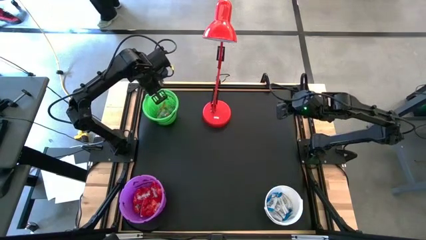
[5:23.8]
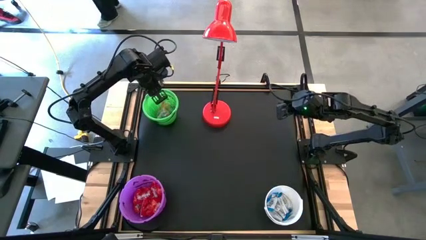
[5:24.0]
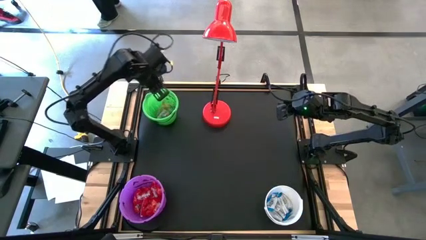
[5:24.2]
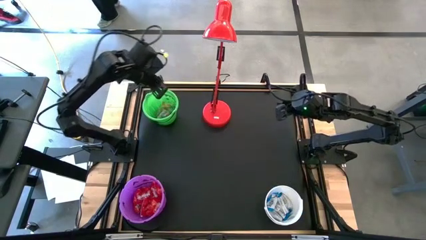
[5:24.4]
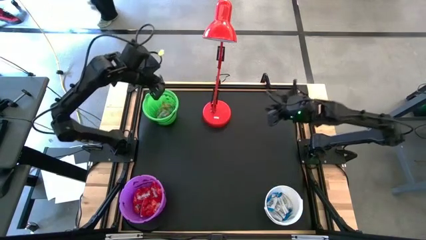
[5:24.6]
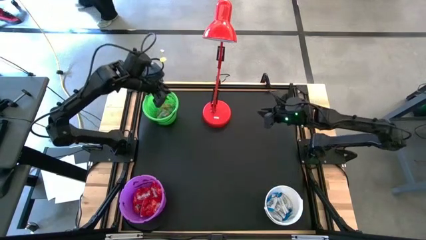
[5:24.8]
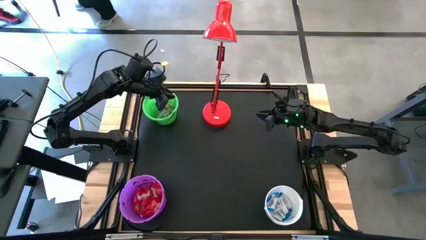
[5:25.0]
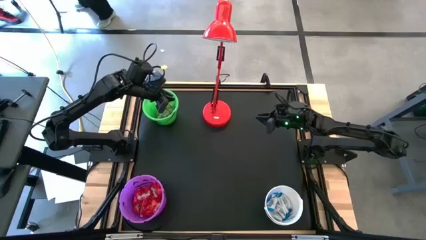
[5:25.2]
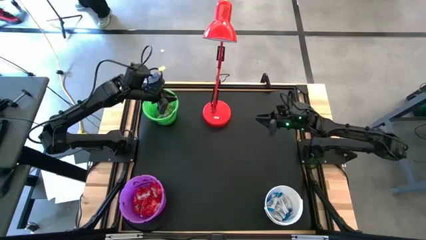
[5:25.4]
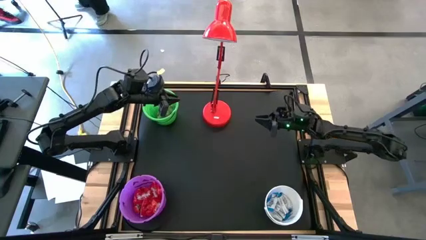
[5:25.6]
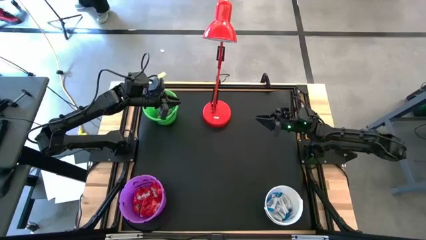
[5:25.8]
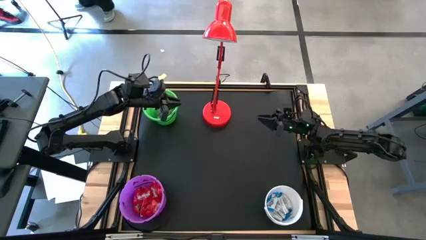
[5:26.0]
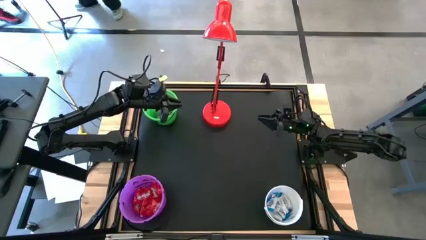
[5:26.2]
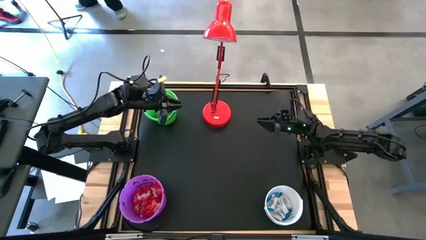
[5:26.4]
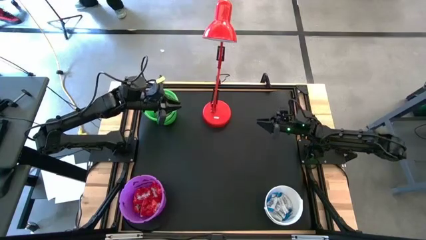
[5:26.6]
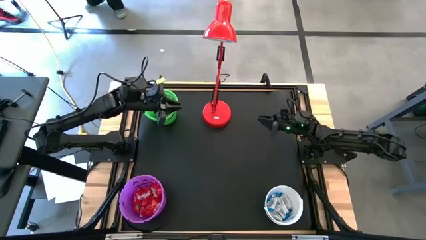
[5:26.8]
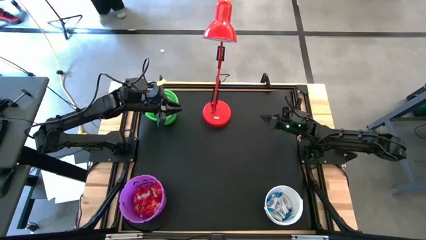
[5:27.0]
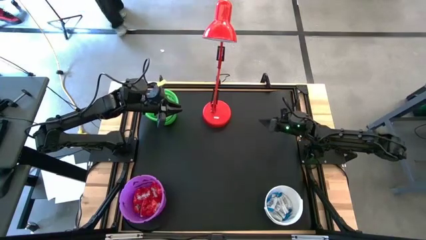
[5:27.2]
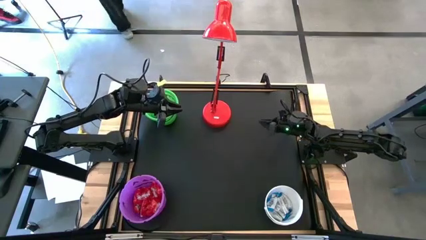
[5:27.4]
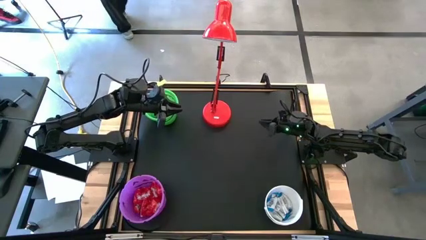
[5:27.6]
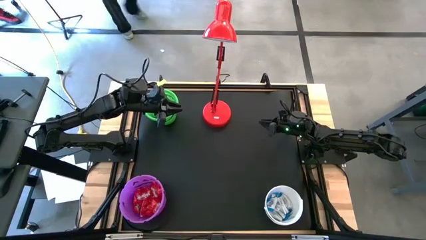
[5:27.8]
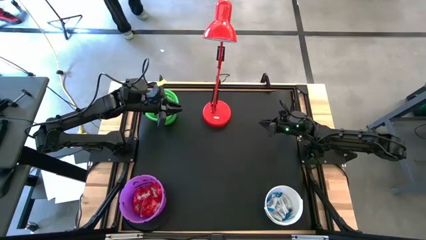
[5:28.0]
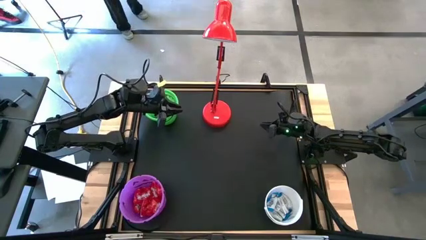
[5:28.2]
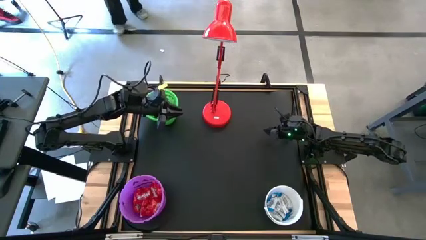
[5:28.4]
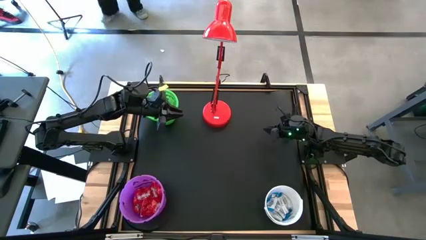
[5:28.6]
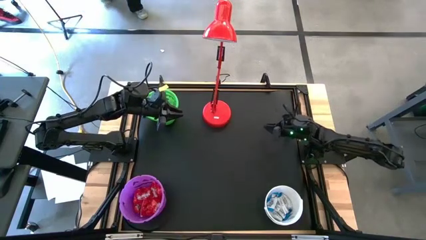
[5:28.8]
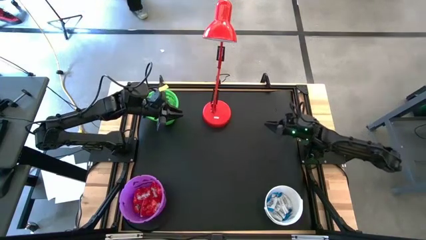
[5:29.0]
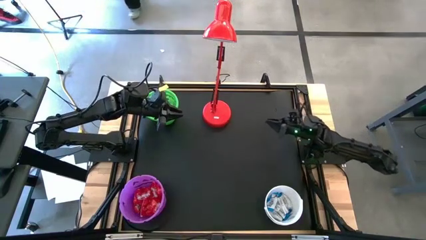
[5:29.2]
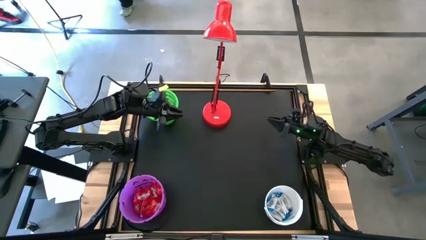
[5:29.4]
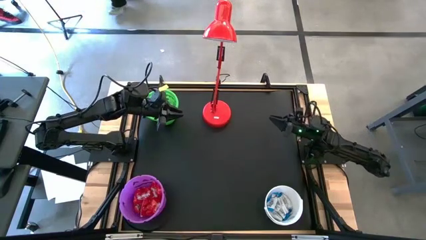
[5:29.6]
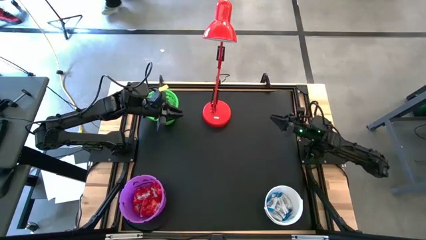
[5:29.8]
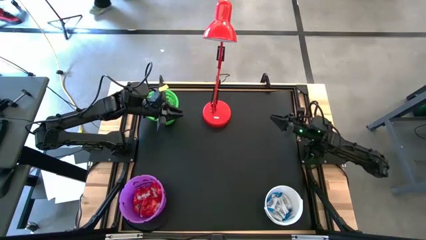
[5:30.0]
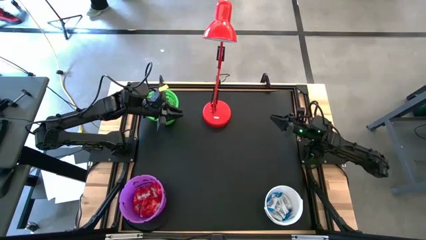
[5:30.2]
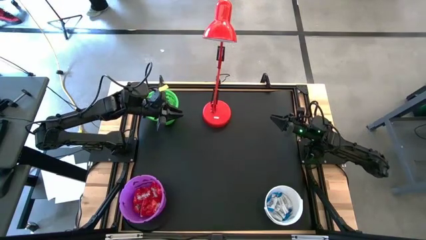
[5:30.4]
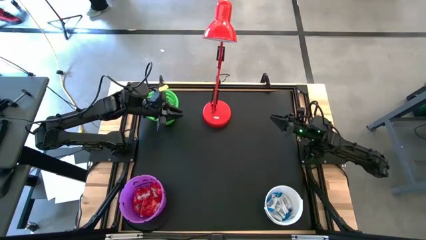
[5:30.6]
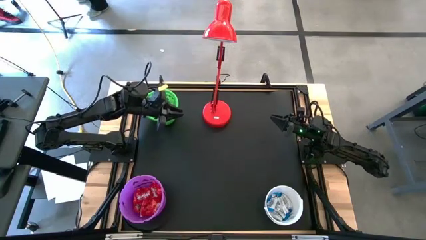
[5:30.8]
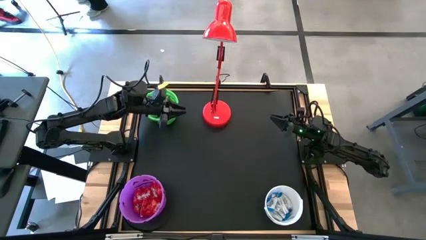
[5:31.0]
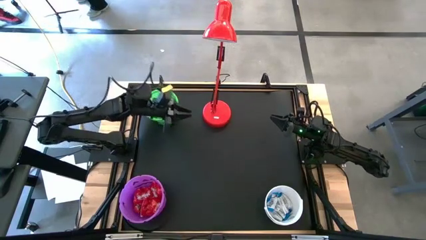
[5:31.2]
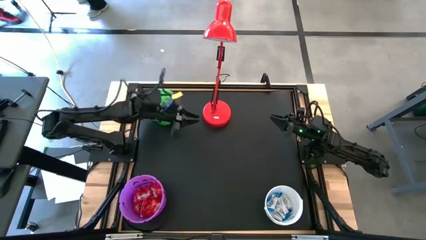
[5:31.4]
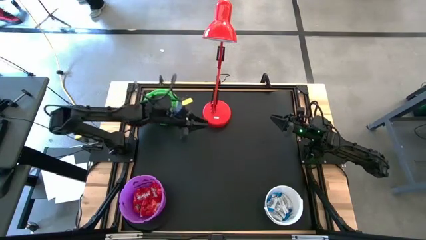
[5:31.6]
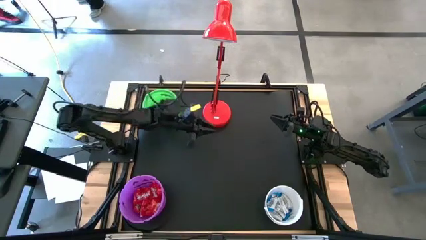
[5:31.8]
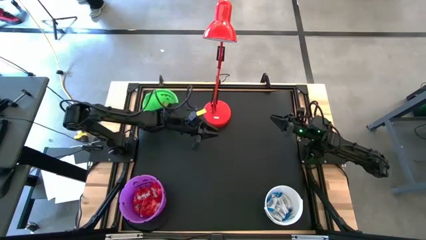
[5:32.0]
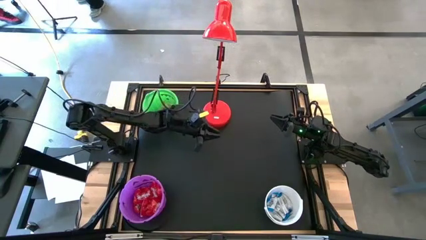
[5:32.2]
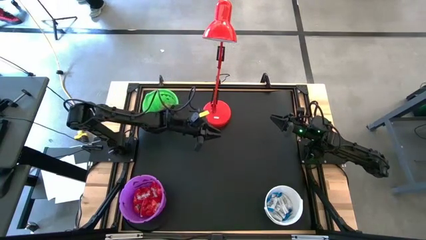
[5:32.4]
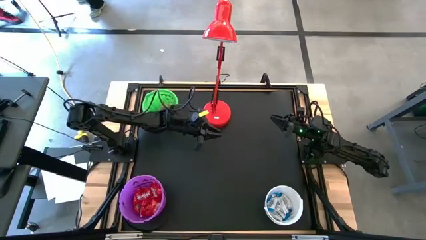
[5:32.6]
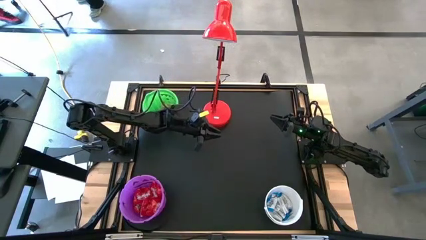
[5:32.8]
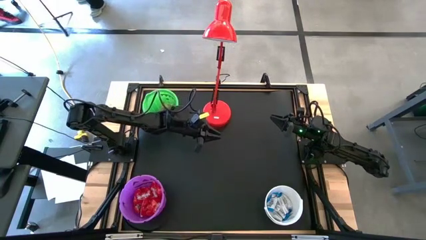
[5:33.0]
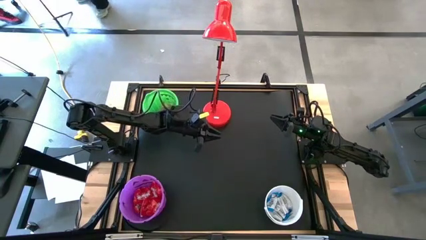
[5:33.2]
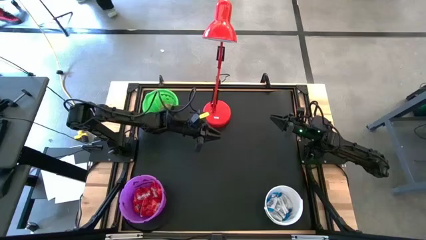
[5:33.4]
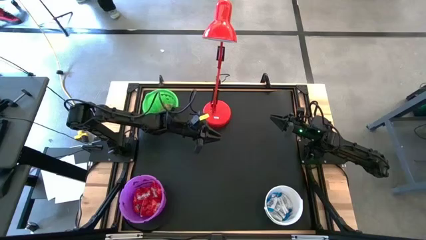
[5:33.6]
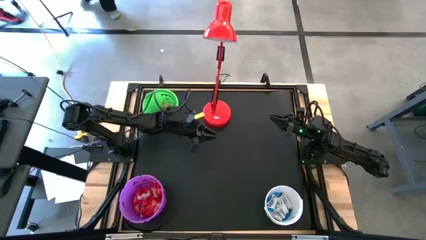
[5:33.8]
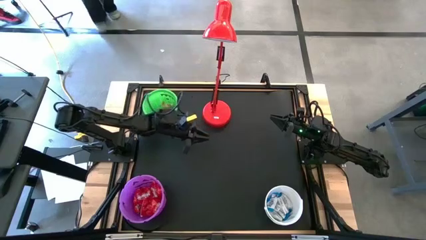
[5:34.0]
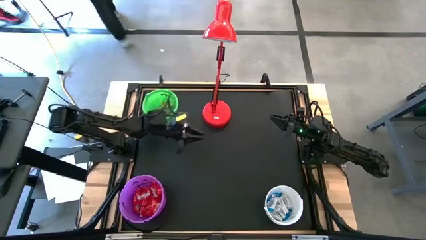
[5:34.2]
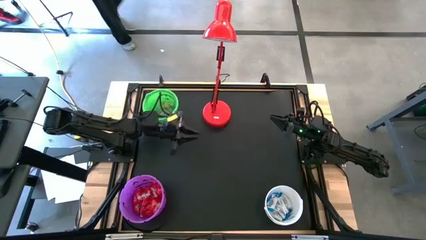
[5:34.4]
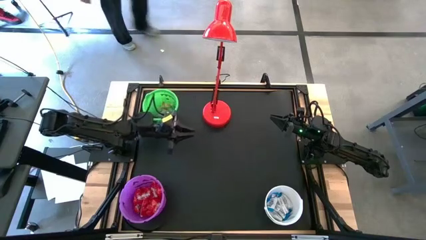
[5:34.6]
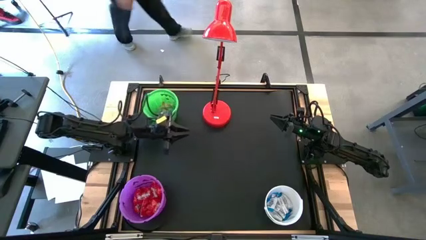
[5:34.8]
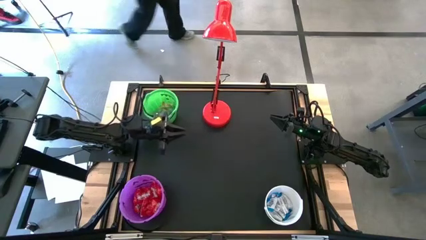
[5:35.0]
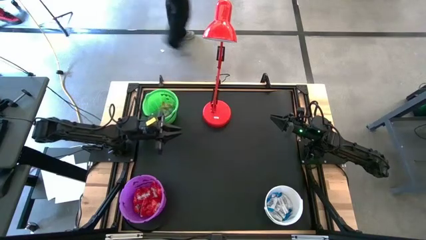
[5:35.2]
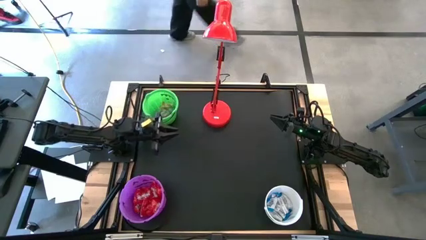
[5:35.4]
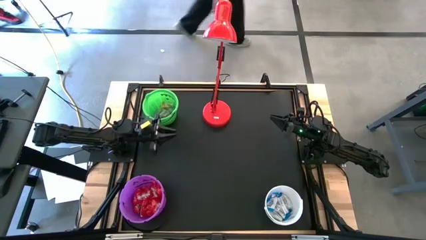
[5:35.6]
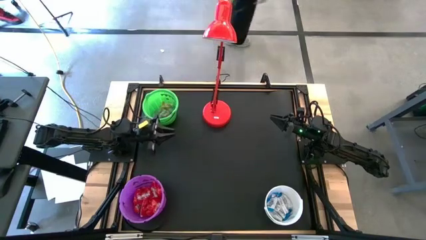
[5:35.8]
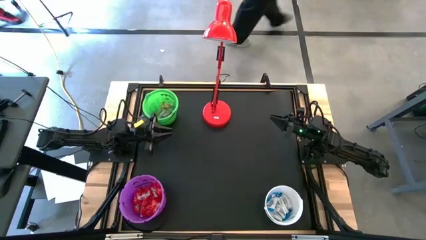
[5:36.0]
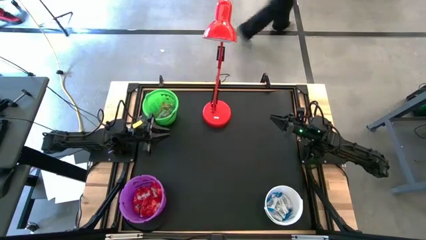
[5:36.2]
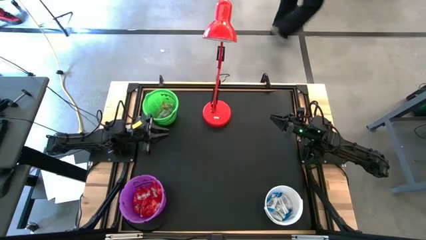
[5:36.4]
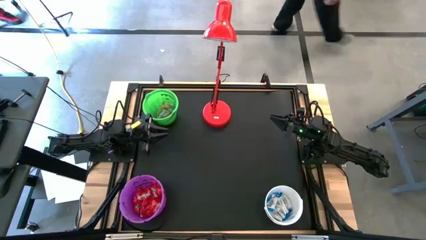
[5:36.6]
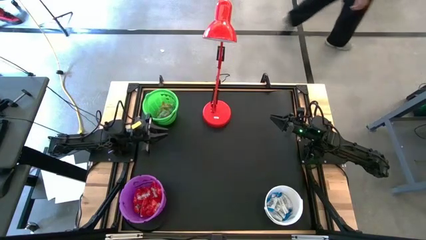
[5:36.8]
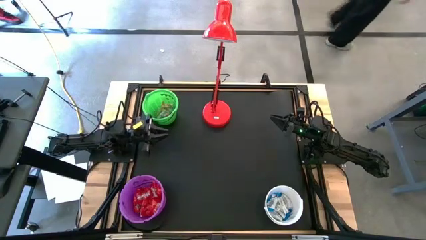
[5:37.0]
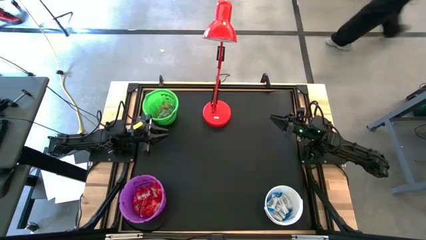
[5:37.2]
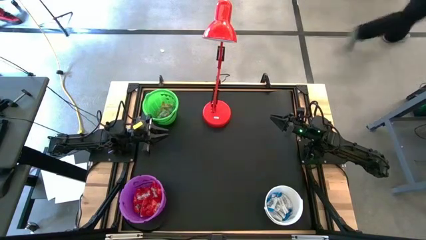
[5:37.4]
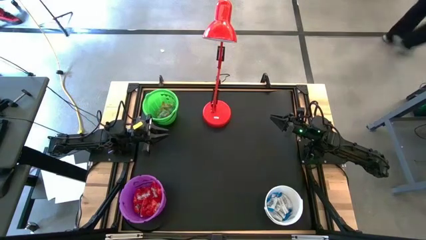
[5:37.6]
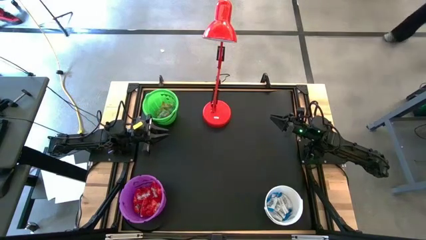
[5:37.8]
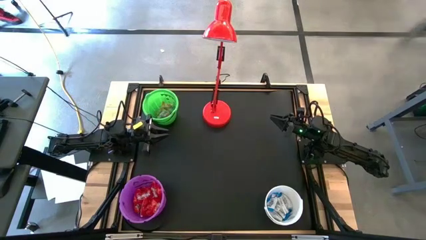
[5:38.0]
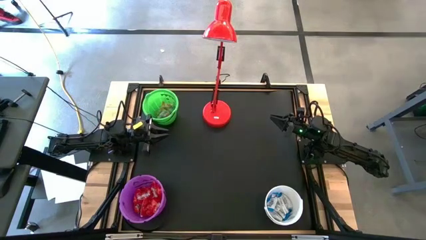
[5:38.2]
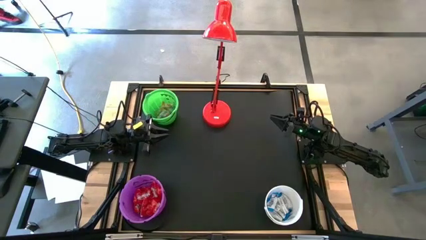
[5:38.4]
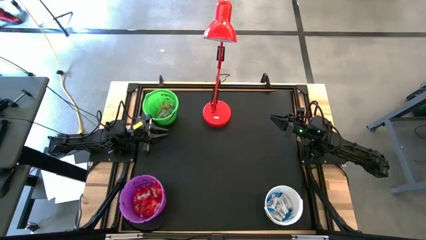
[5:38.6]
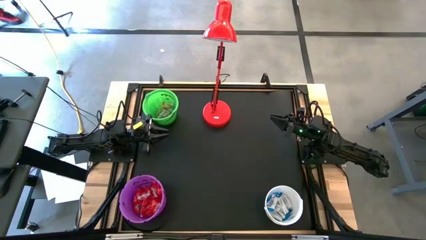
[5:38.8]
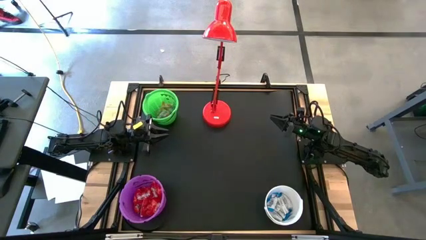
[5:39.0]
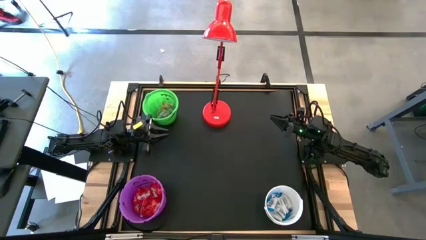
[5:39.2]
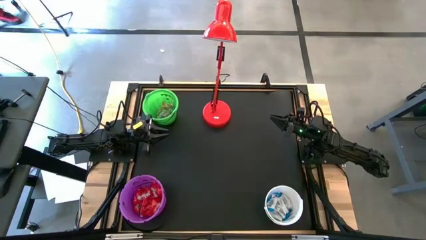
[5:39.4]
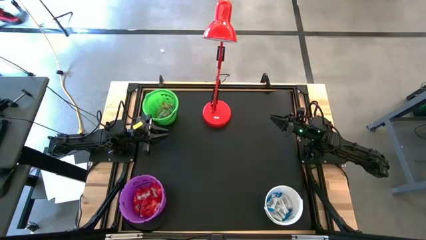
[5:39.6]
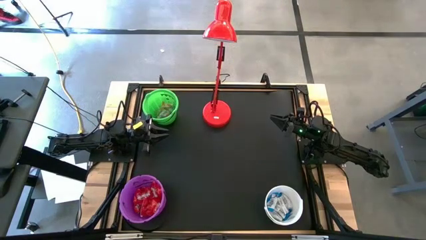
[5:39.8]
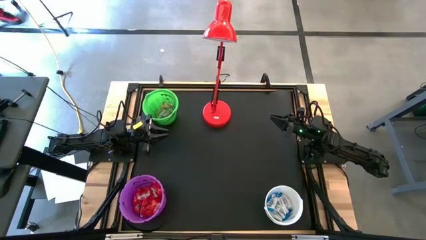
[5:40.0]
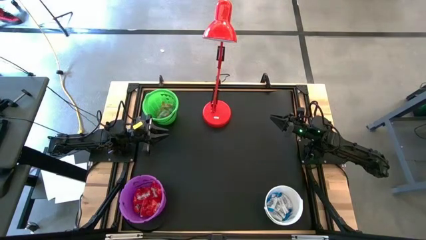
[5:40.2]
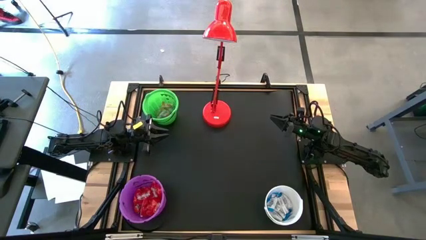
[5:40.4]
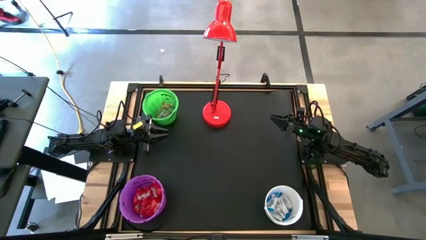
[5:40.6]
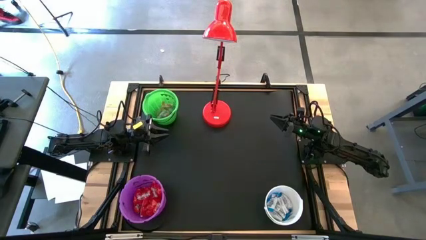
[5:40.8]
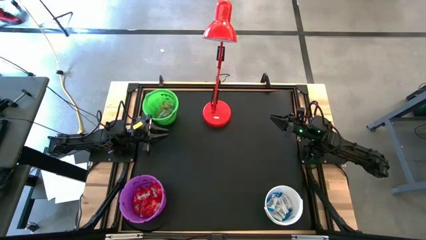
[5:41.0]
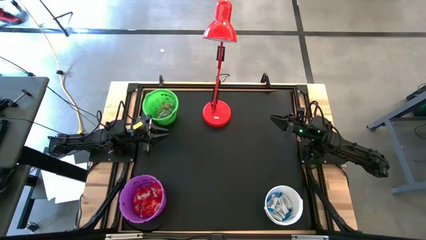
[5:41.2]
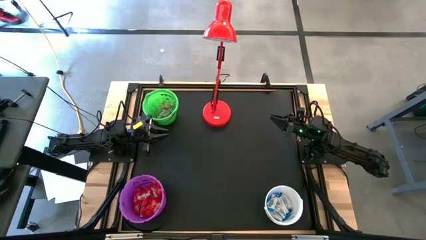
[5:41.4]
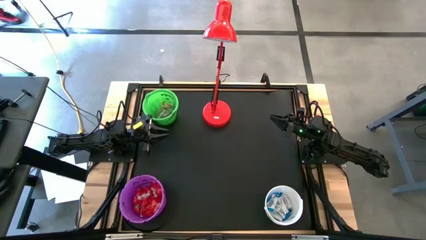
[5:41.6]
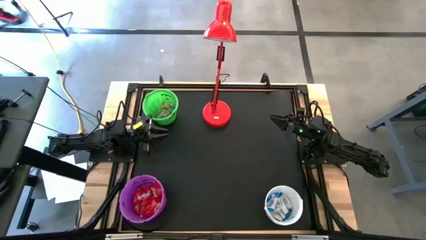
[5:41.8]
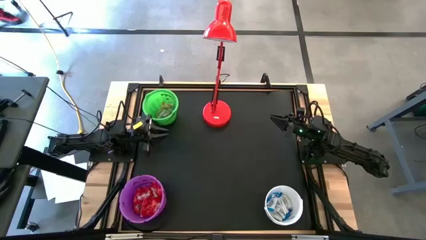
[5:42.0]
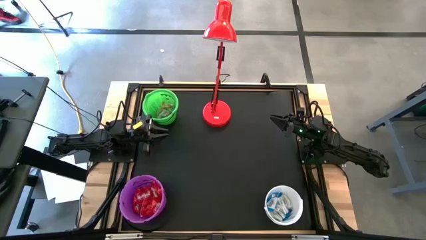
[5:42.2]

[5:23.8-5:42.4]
Task: Sort candy
Return to Home Position
